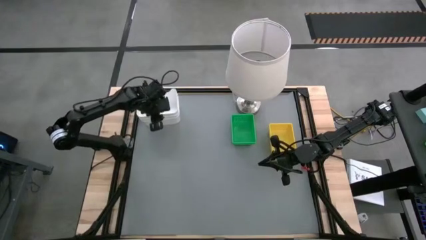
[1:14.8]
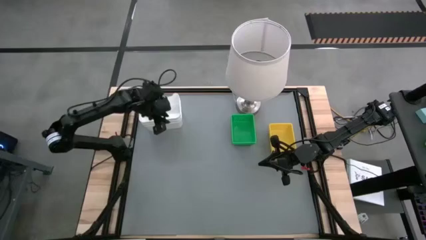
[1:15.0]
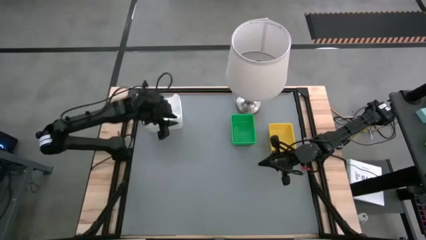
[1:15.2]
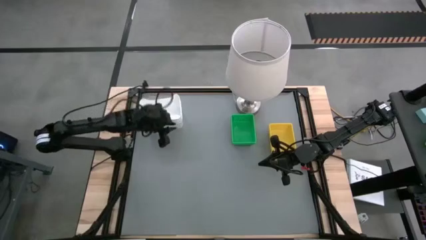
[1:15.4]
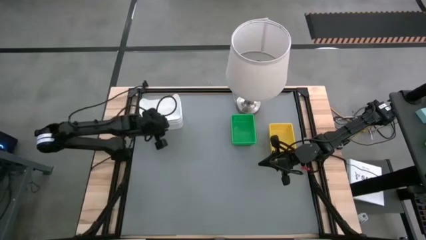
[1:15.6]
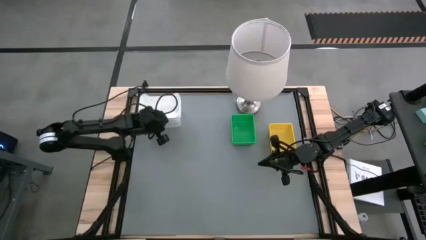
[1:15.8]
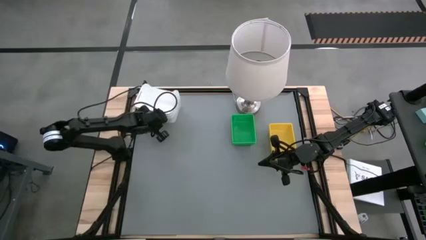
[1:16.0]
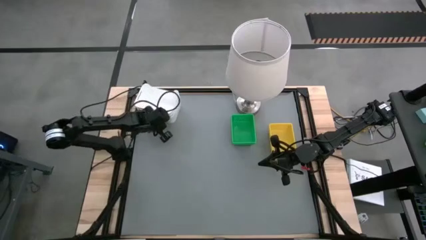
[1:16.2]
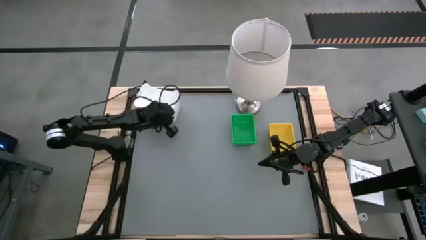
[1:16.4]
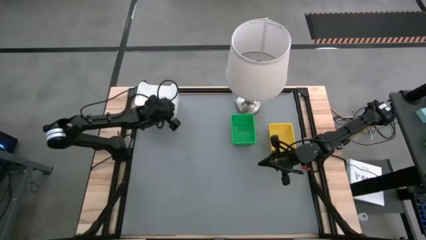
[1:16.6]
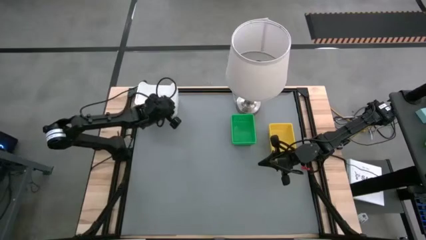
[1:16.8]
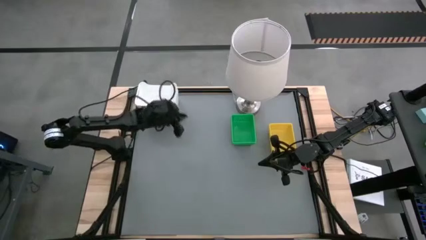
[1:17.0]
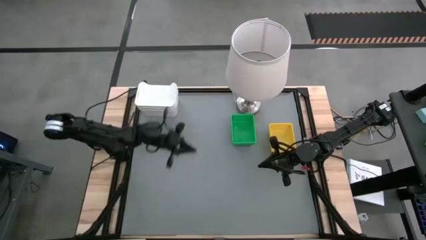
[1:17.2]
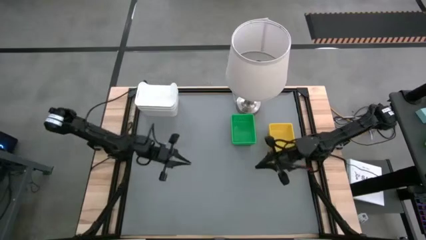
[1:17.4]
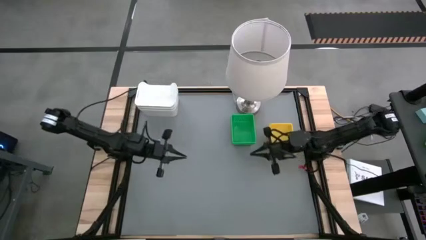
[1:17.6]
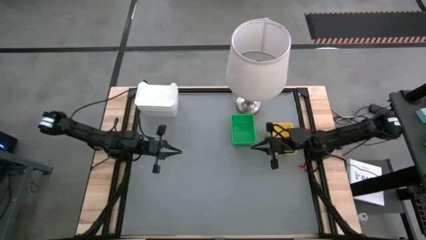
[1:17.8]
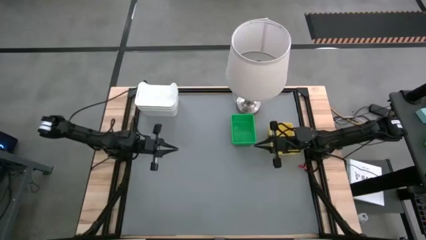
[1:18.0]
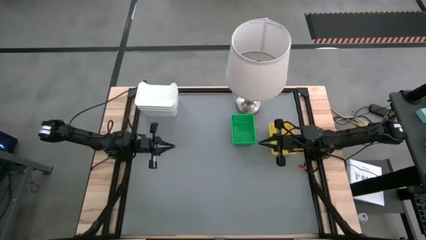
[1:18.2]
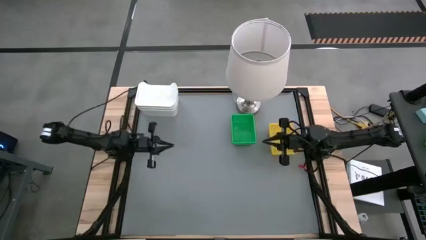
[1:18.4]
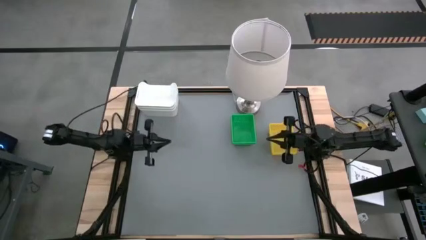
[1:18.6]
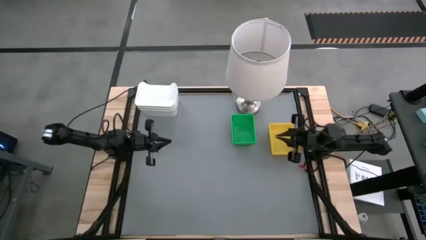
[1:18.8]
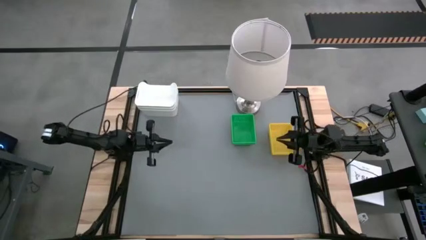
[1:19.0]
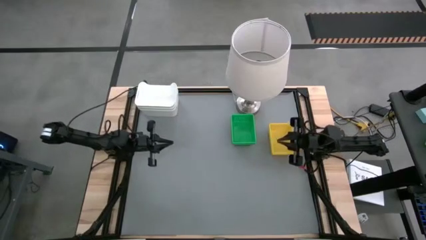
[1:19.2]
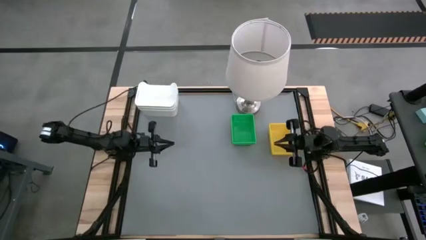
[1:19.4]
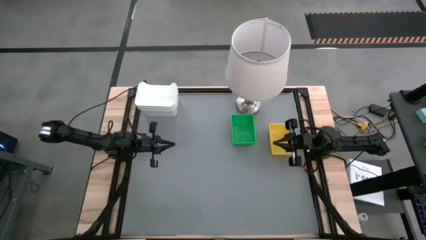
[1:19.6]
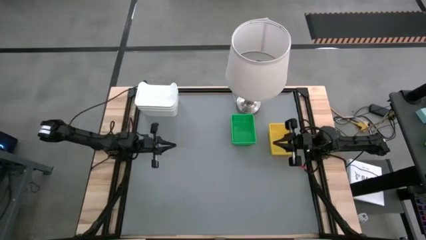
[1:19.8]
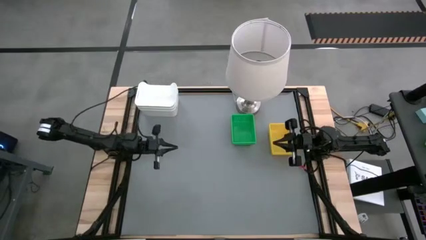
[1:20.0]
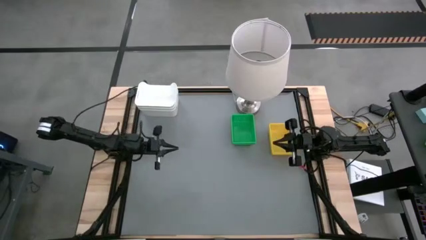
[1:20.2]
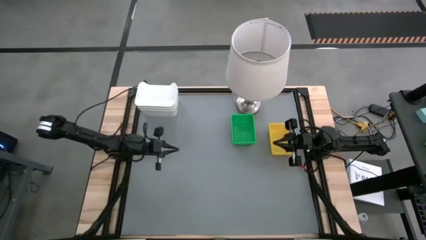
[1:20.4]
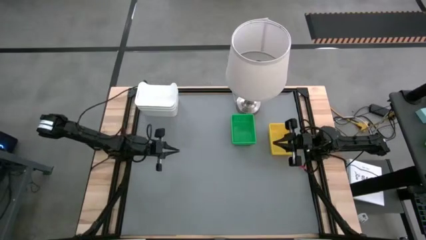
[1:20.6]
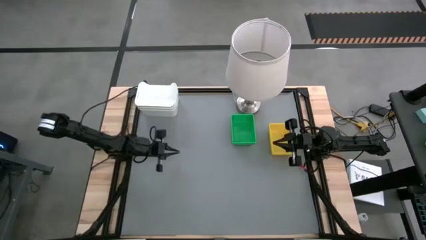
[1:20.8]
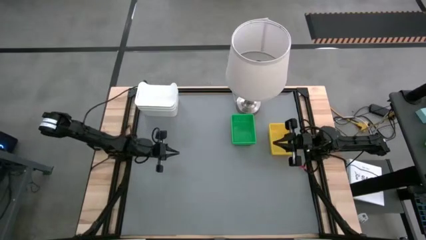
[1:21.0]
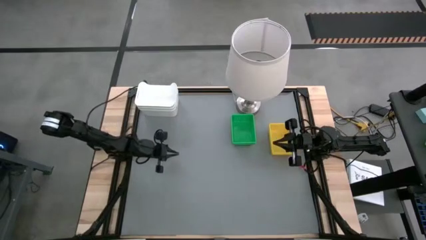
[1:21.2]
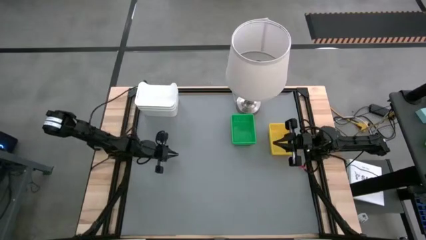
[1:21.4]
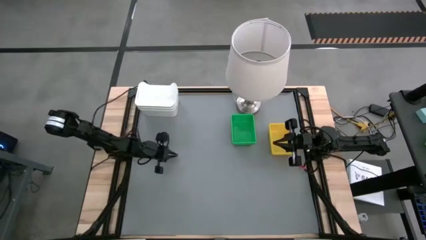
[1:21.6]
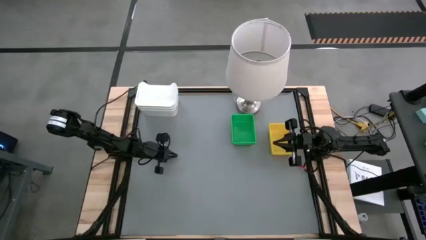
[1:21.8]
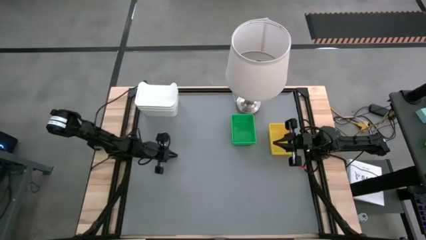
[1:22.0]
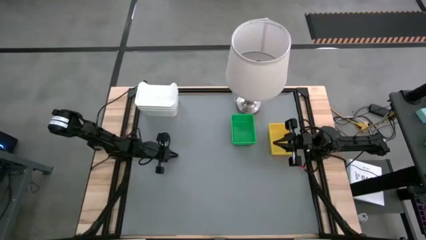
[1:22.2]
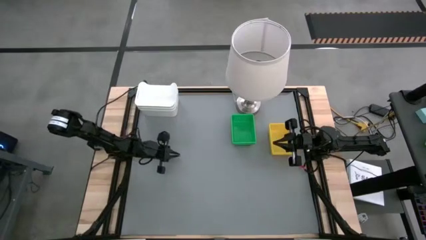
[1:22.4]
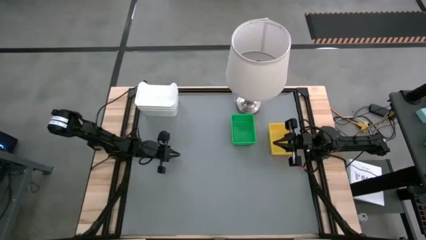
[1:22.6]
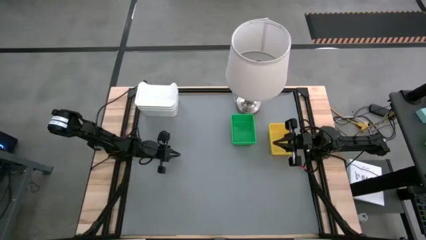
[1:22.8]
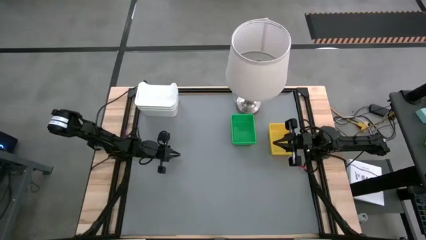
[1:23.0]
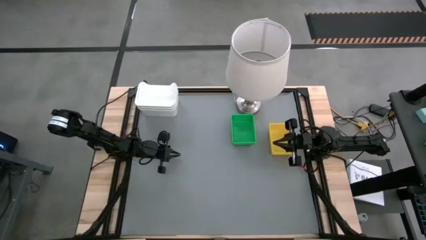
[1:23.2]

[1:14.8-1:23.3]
Return to Home Position
